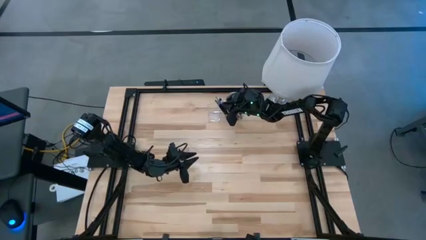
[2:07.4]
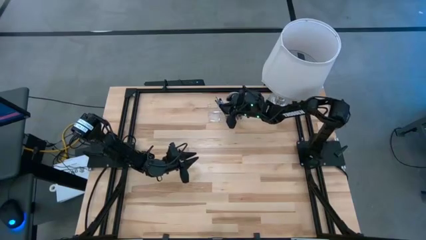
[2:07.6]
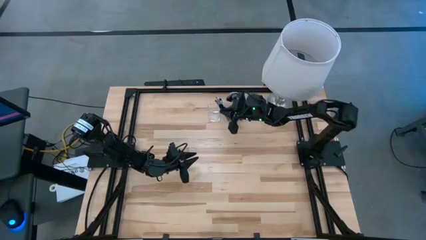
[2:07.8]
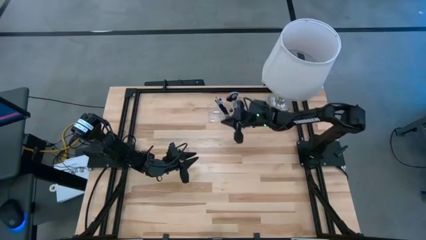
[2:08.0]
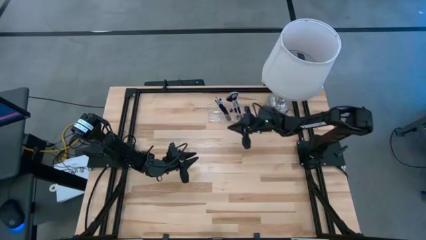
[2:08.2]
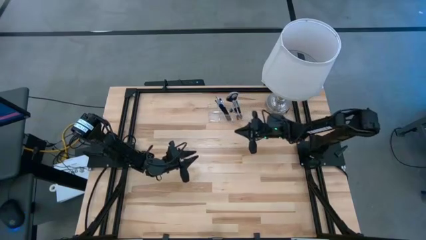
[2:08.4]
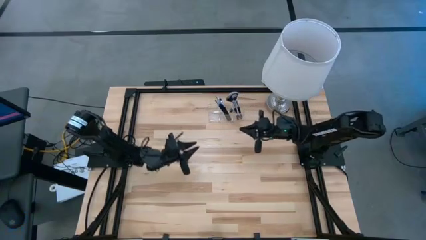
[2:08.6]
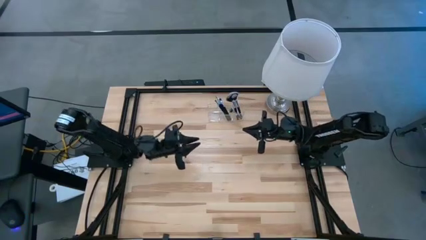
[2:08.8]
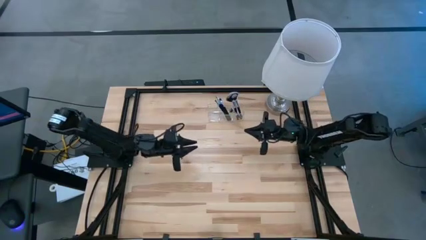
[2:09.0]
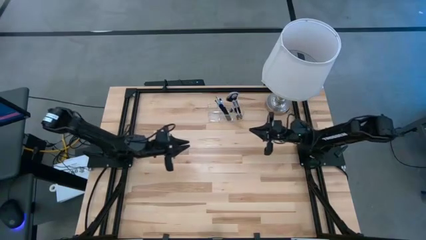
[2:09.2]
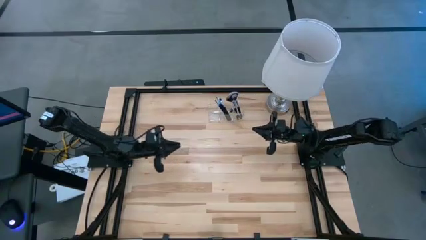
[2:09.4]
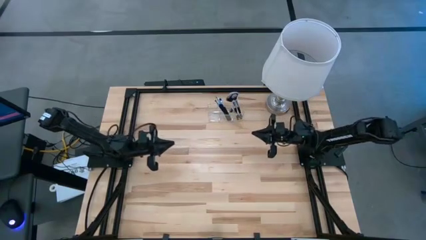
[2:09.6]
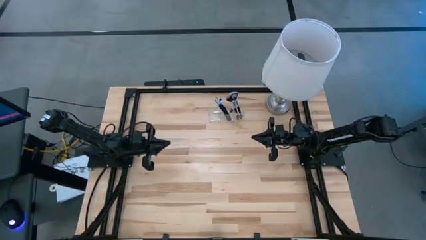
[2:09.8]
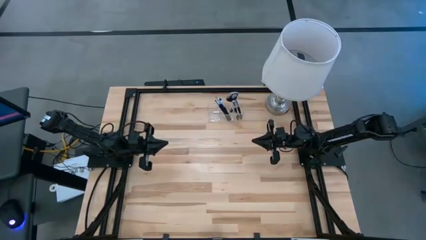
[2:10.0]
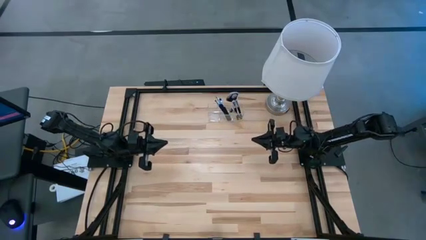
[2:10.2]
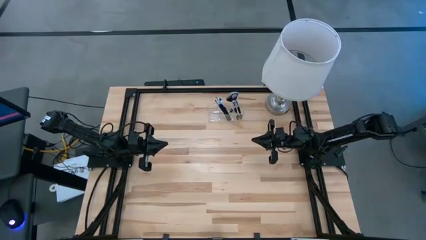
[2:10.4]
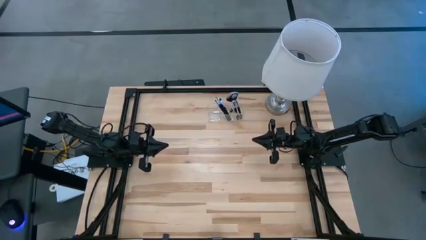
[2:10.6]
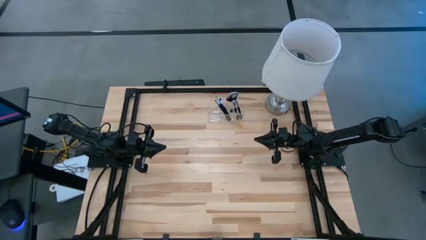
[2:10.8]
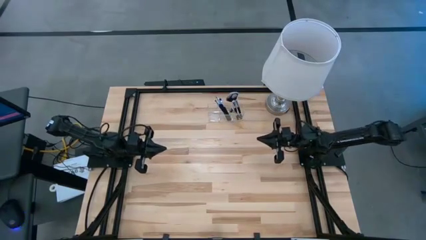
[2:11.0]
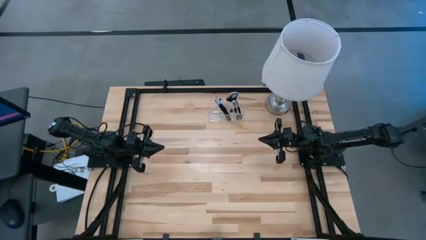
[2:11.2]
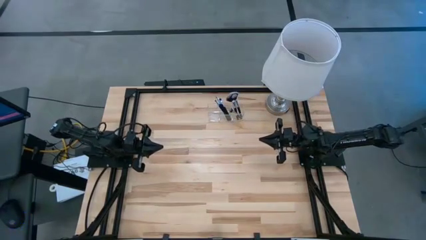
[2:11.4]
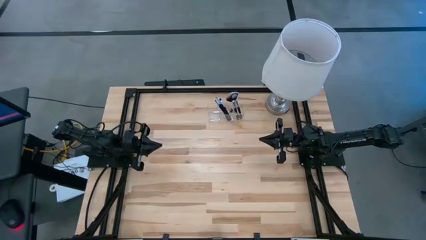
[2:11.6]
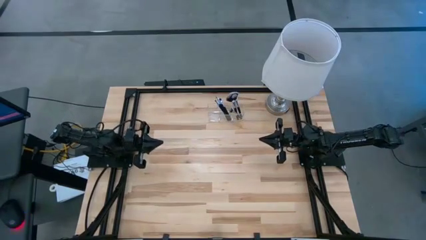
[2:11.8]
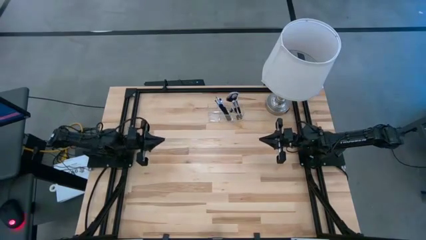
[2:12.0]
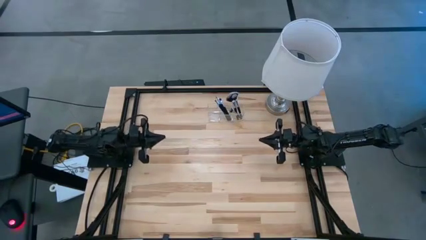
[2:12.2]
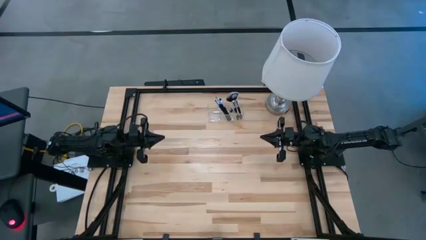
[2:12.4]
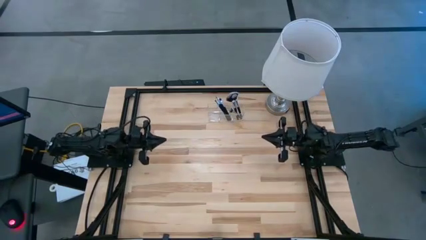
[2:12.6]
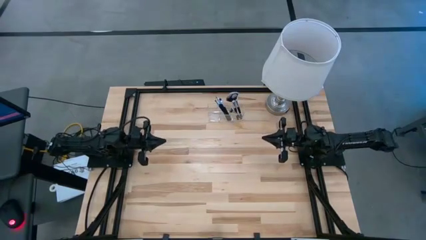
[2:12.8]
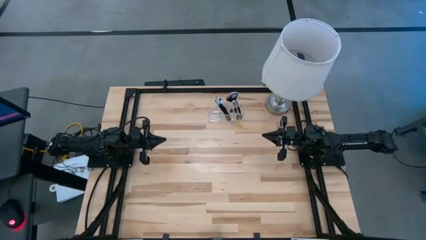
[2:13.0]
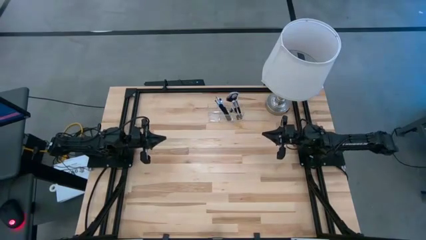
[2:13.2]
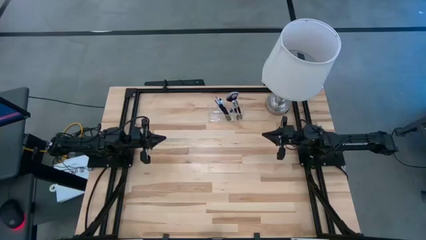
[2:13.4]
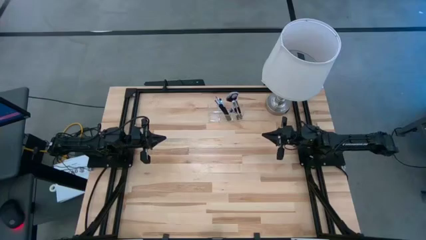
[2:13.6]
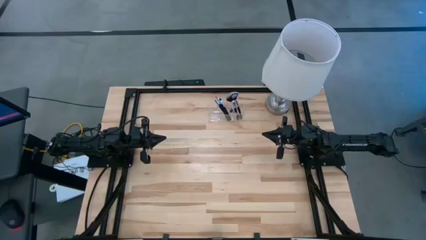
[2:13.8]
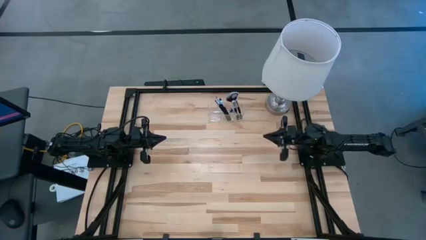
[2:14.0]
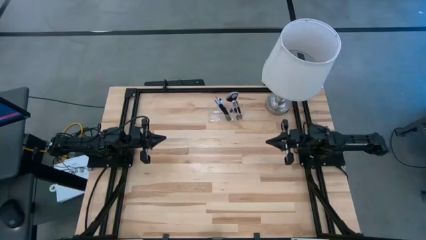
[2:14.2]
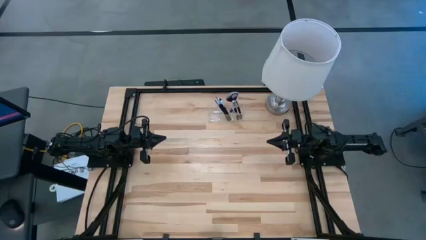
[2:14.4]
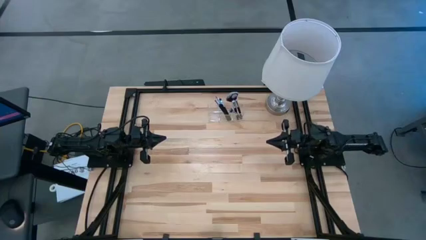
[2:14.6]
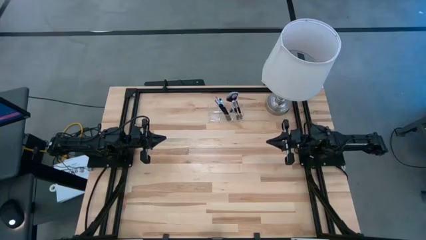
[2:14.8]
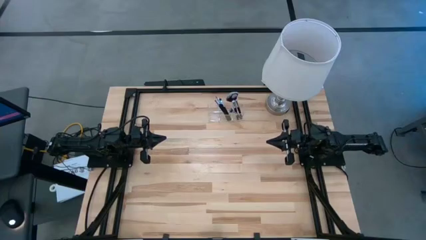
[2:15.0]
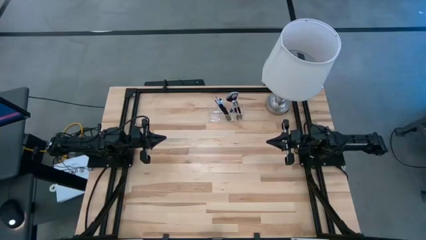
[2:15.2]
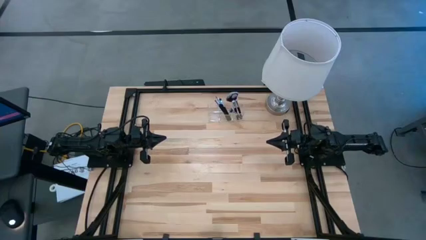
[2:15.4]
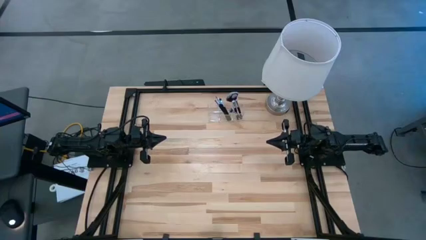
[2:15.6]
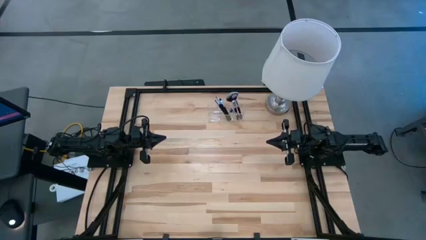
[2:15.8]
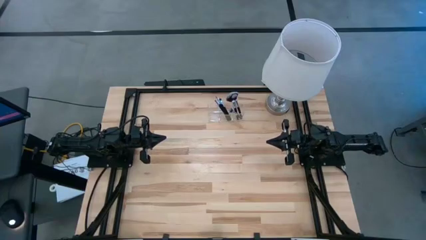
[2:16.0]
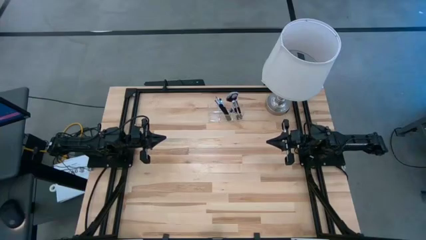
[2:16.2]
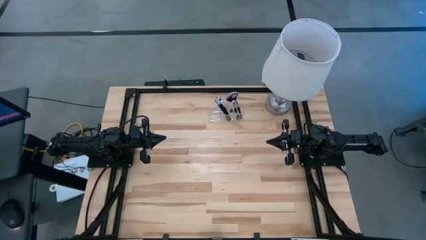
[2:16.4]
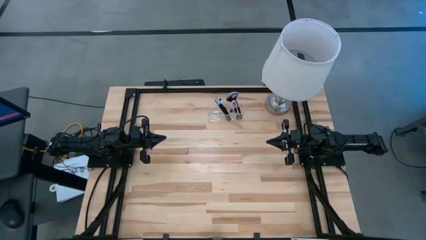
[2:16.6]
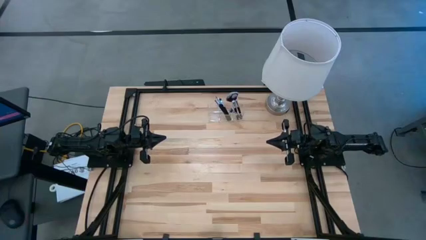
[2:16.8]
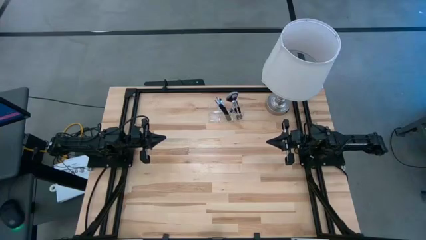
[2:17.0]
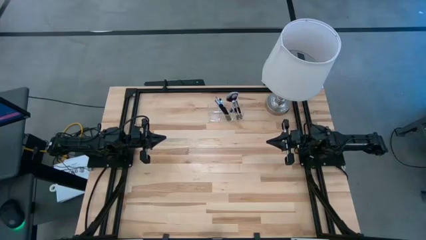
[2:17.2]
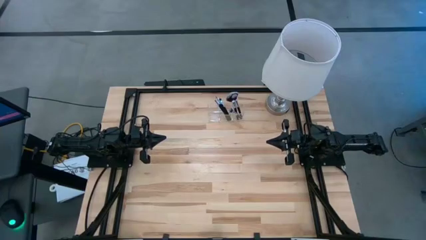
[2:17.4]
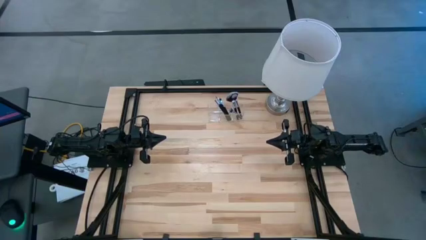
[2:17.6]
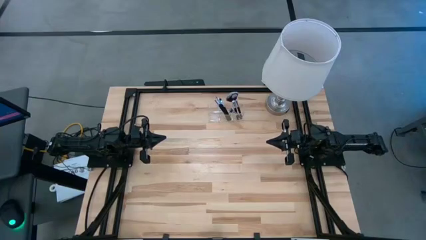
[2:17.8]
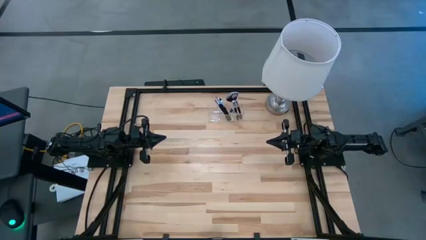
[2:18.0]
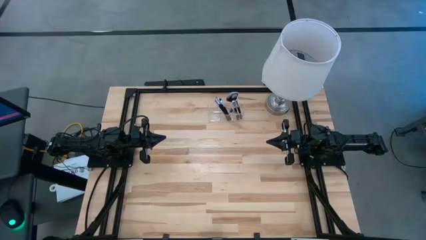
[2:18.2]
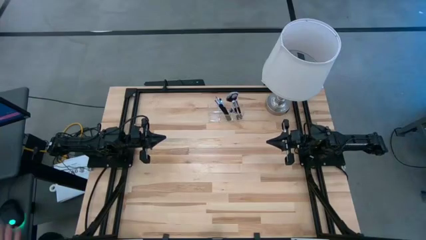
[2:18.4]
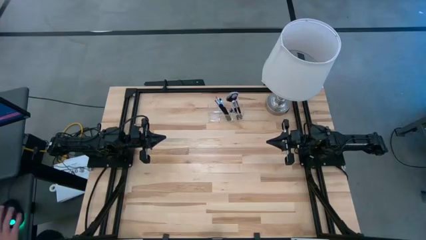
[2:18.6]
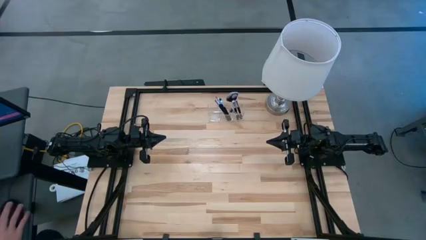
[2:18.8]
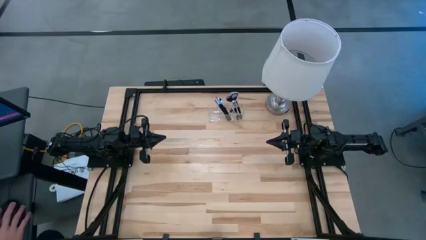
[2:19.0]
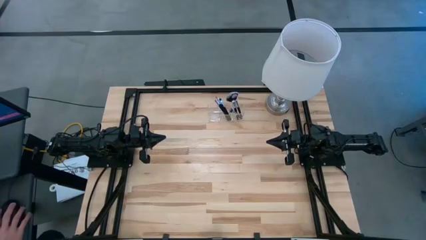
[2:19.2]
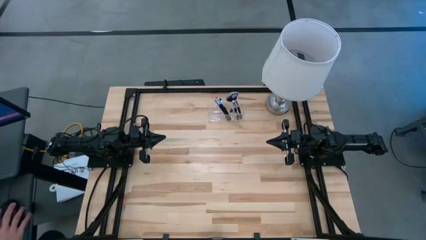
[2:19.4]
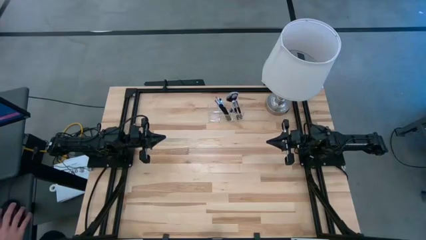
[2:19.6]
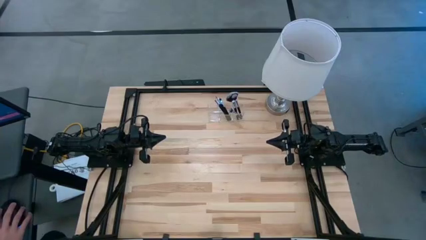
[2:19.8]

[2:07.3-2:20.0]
Task: Put items in baskets/containers
Return to Home Position

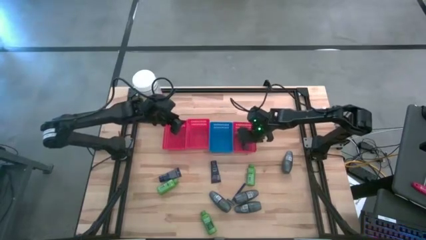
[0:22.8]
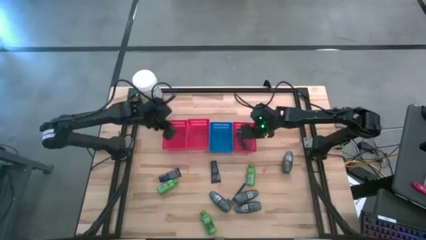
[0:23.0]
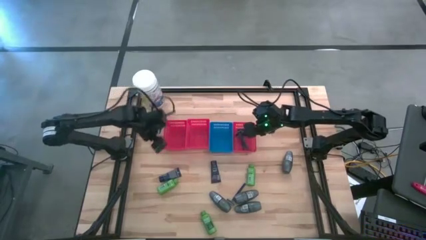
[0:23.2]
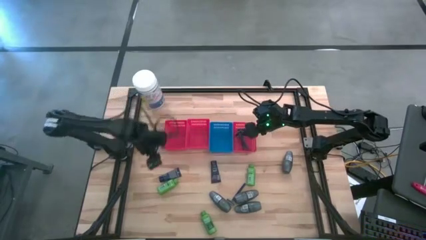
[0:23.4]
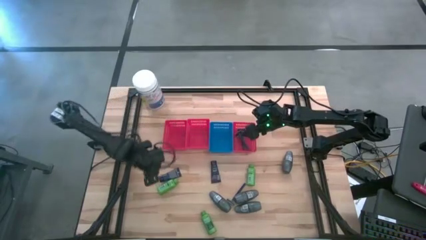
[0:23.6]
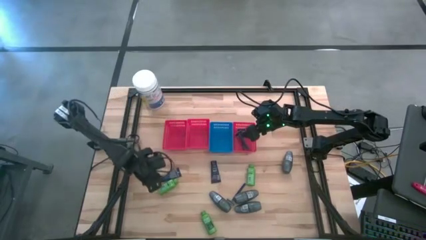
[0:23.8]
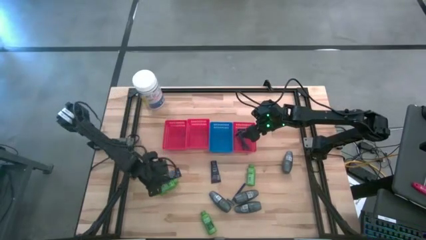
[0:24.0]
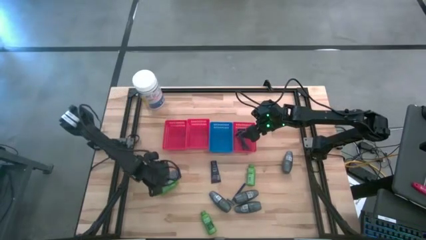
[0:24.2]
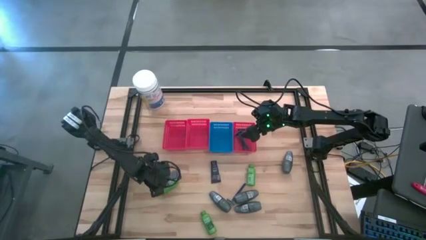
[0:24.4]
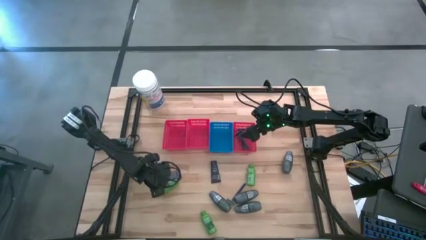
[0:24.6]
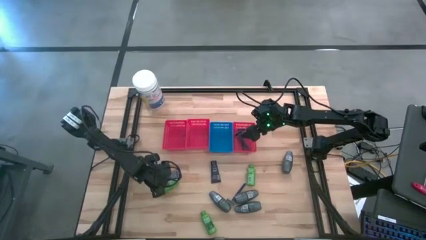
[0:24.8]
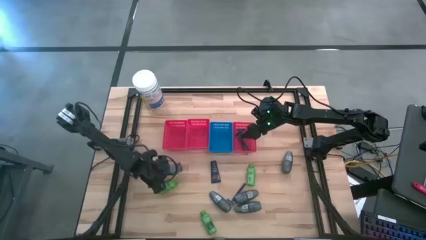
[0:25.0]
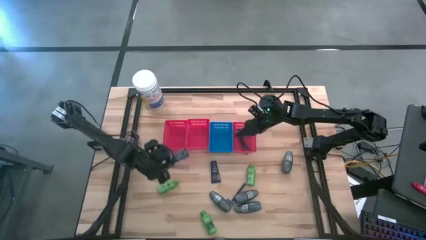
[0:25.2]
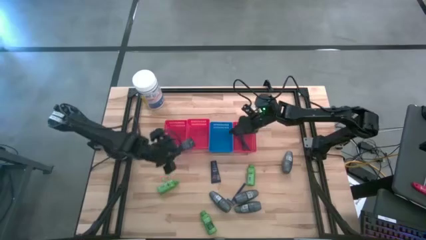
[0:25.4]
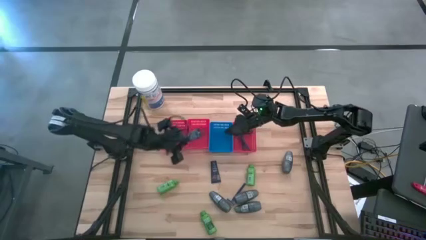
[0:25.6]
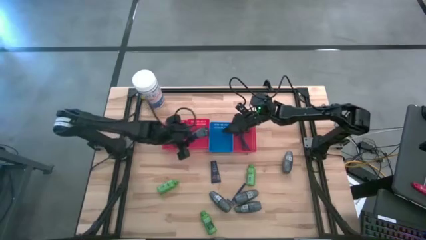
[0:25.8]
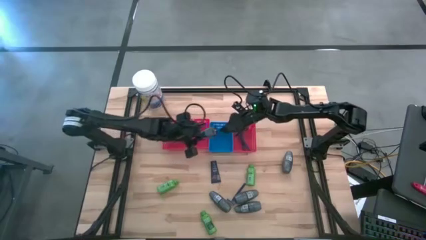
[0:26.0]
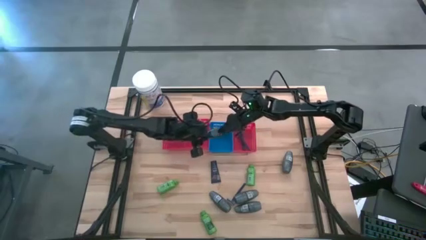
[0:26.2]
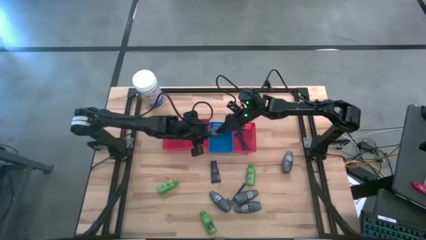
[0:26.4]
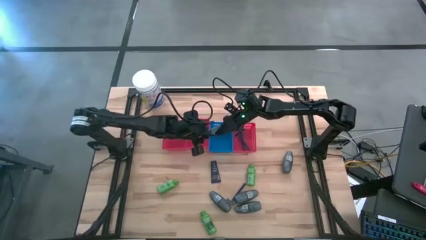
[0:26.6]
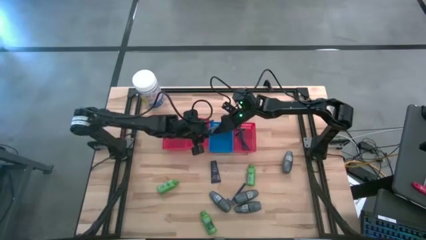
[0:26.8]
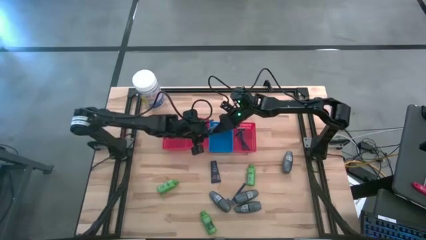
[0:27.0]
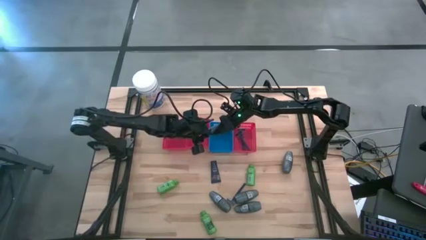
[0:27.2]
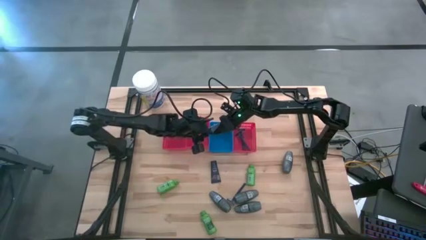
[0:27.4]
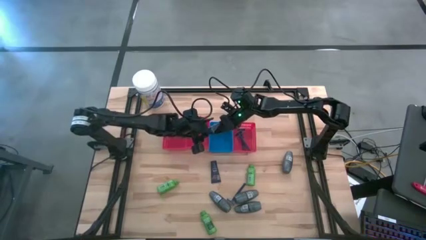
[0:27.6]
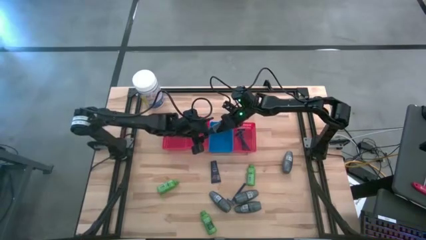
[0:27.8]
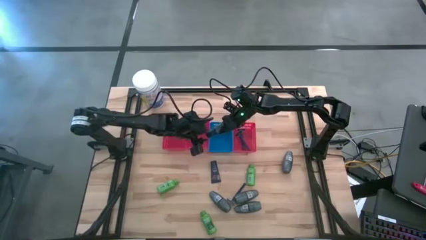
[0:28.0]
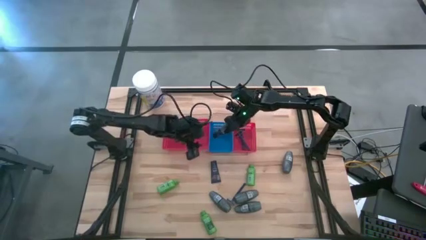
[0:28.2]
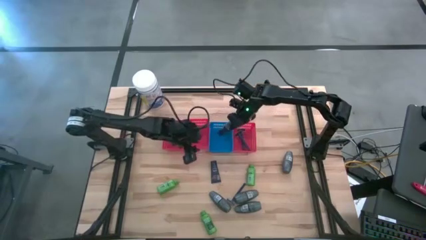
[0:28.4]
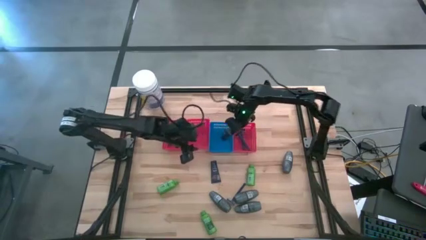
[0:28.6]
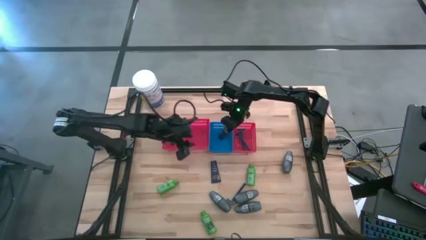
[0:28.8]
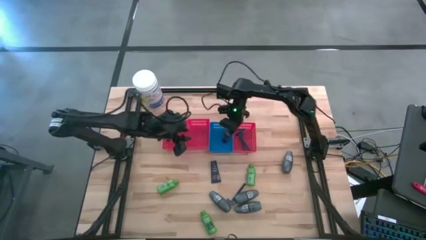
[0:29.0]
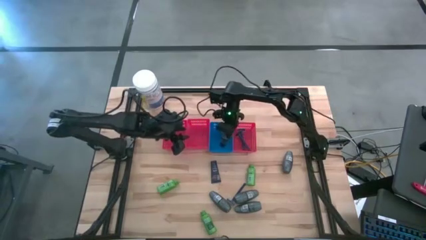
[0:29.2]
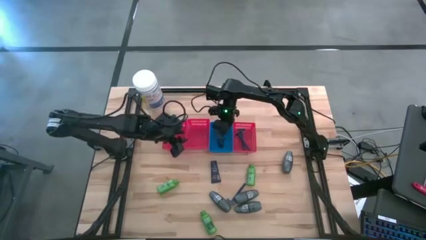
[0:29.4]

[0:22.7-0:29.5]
Task: Pick & Place Travel size toiletries
Put the blue shave cream into the blue bin
